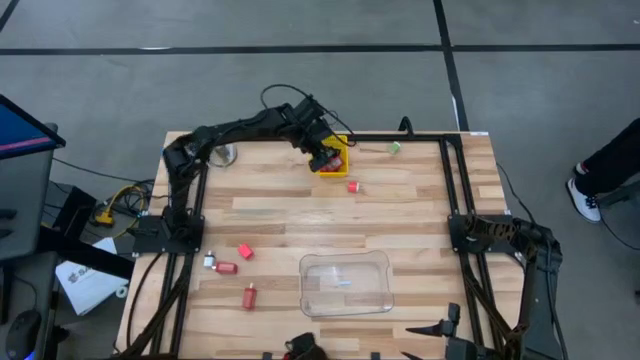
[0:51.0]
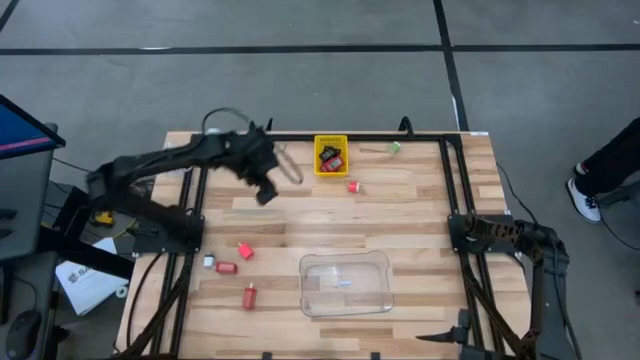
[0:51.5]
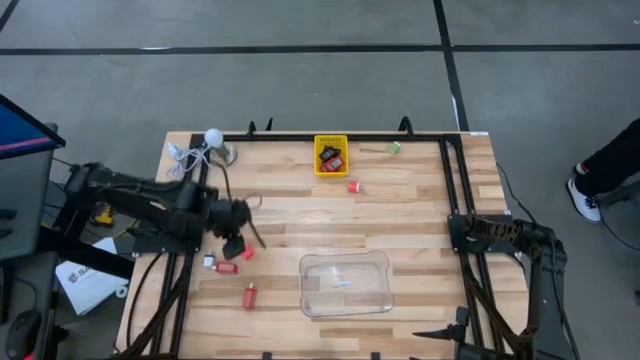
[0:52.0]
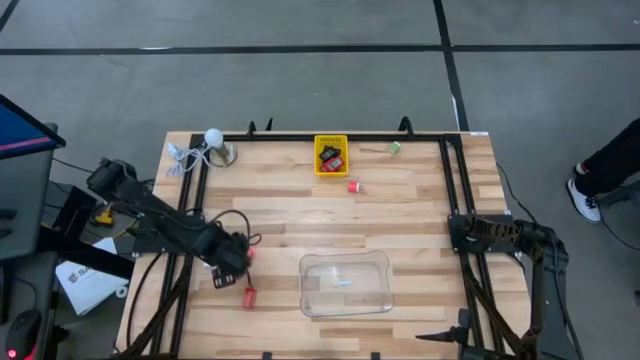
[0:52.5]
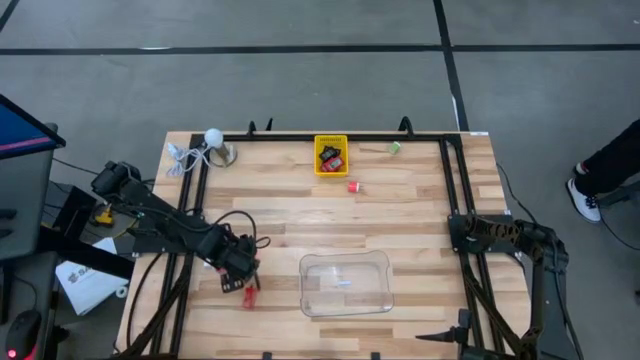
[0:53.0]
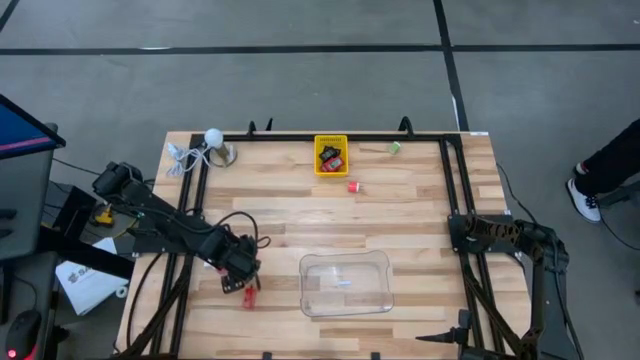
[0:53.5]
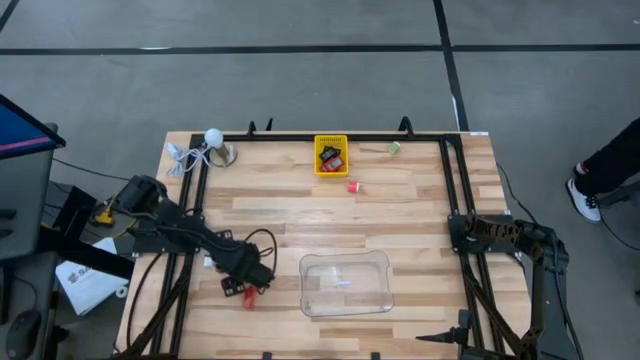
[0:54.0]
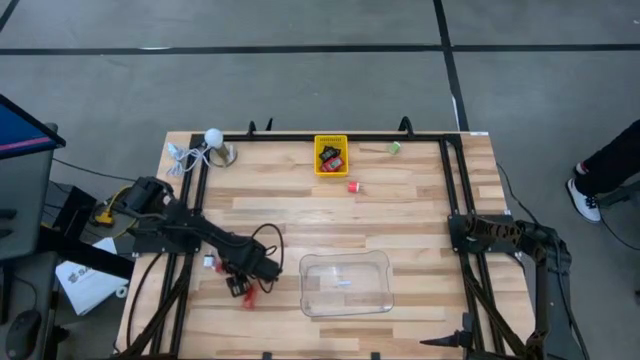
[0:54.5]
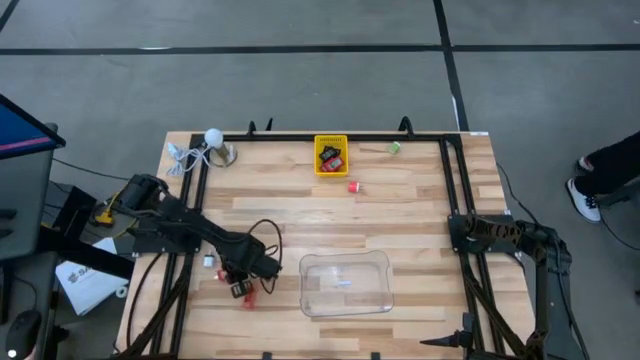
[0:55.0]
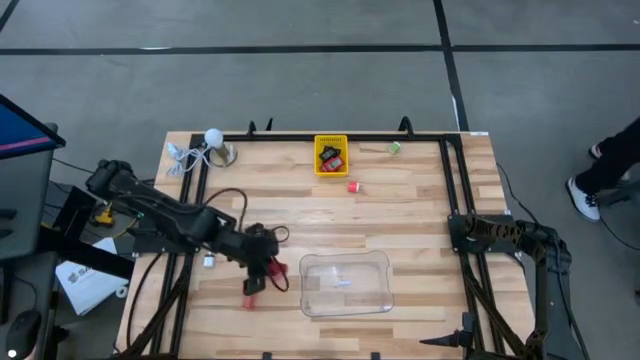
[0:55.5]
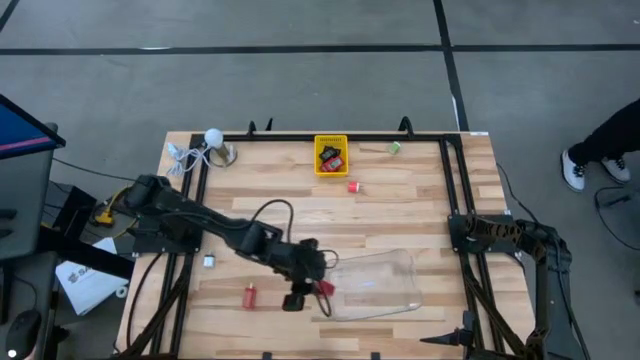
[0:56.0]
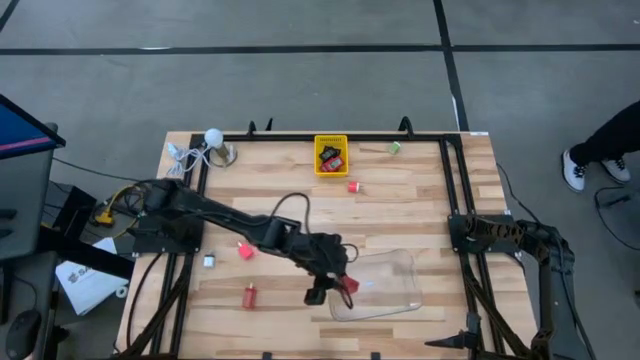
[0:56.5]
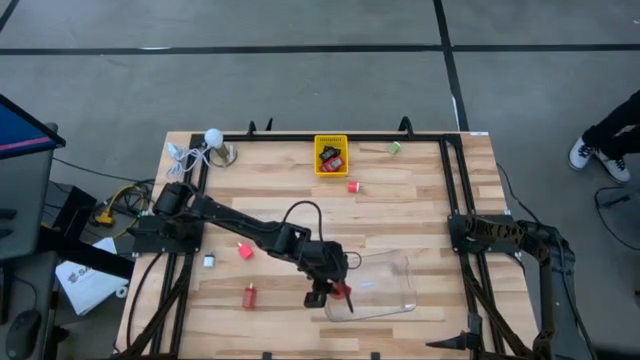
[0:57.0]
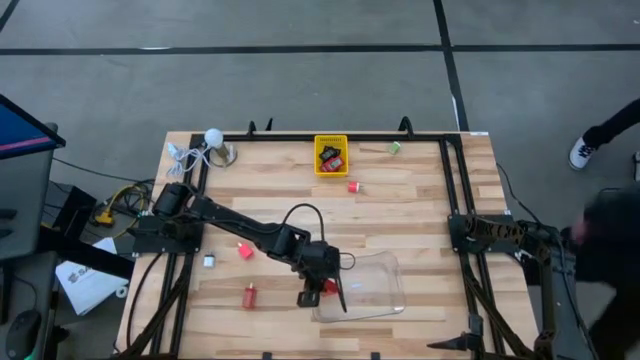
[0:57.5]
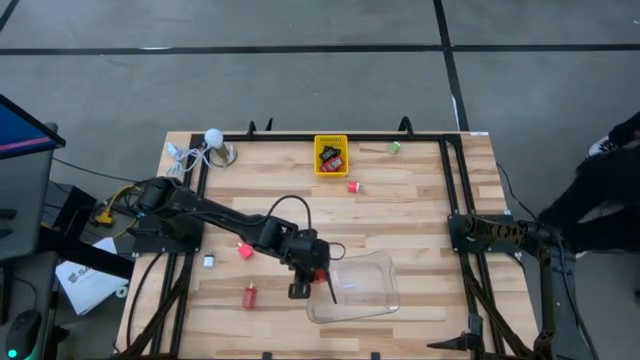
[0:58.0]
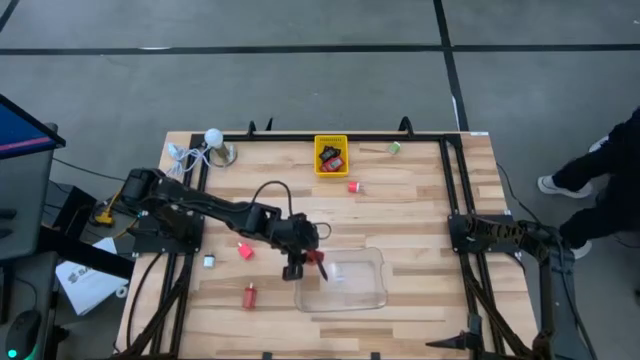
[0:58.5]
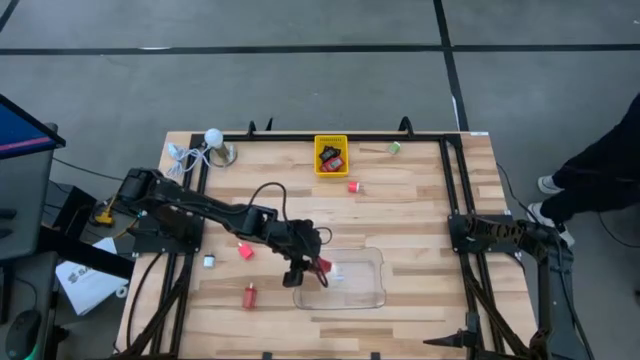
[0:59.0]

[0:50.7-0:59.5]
Task: Pick & Place Office items
Put the red charger adapter on the top into the transparent bin

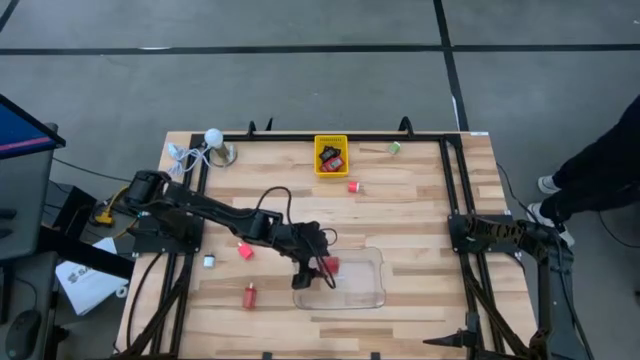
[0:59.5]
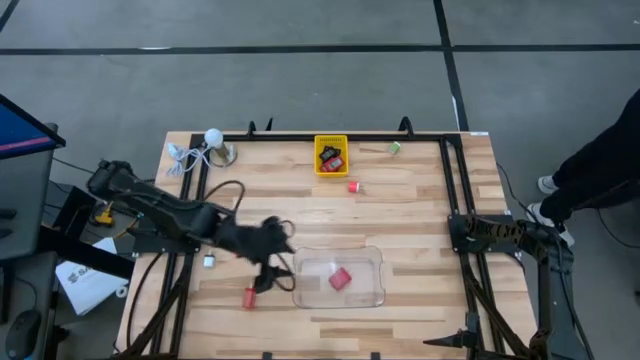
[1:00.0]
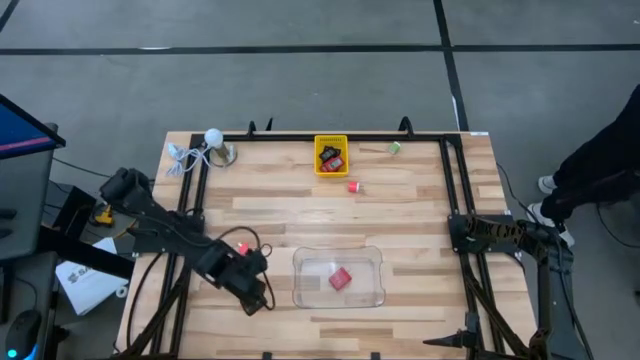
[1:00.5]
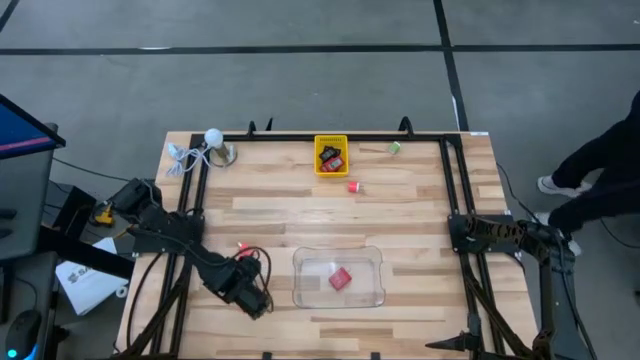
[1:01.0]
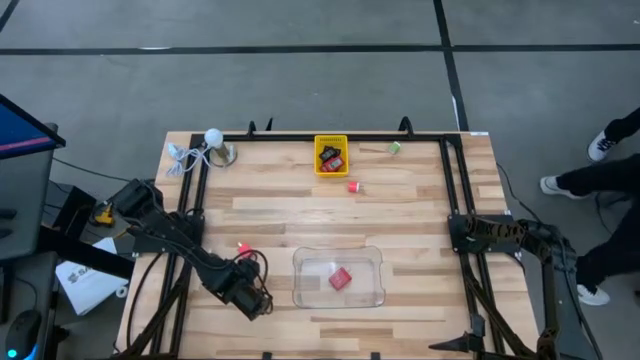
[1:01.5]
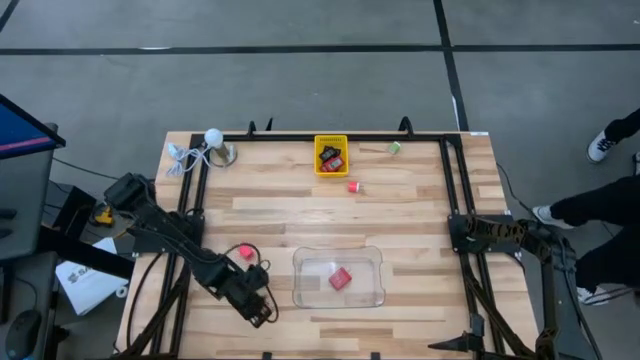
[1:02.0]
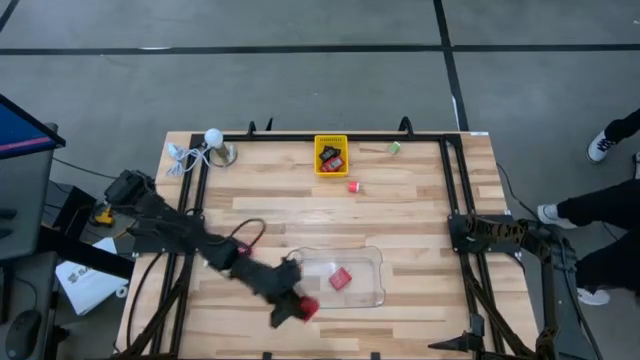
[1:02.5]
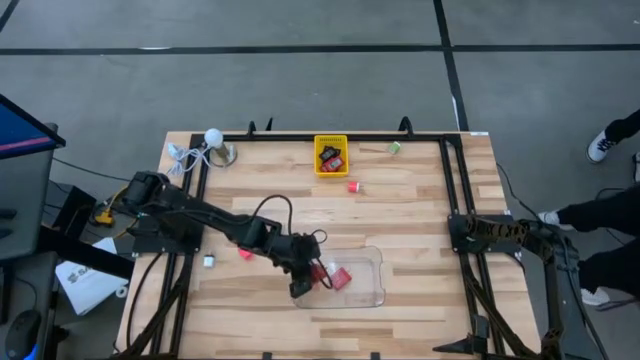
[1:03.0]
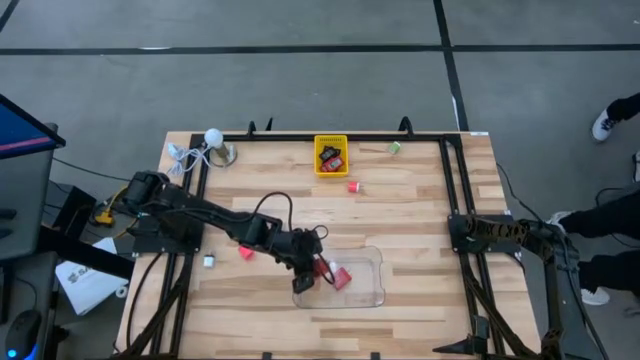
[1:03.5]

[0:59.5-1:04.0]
Put the red charger adapter into the transparent bin

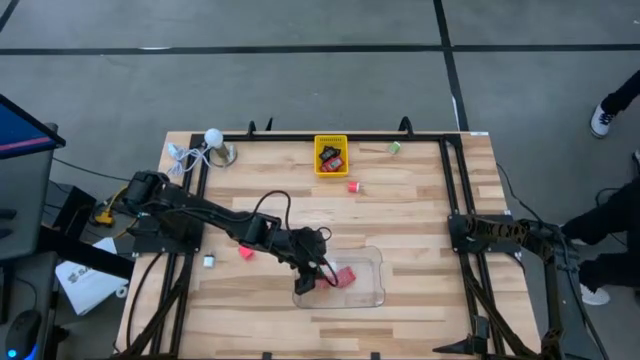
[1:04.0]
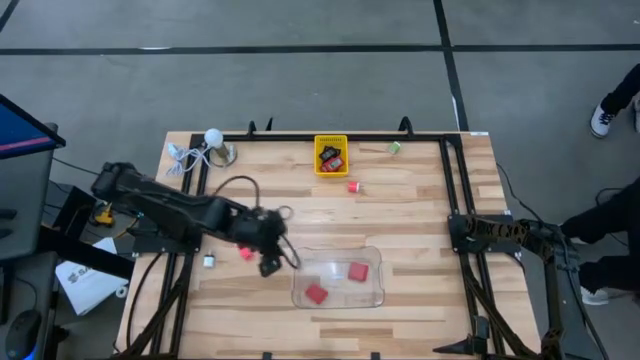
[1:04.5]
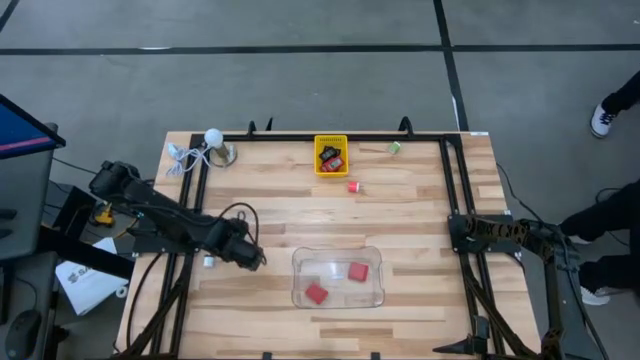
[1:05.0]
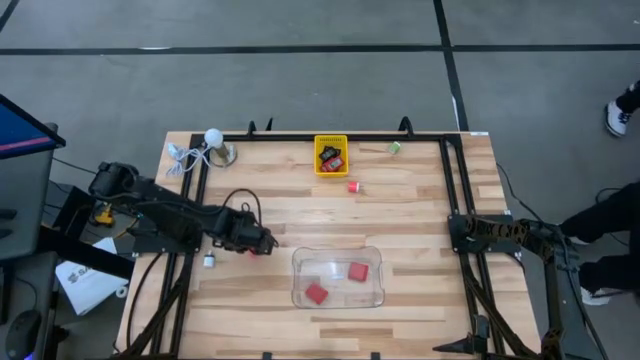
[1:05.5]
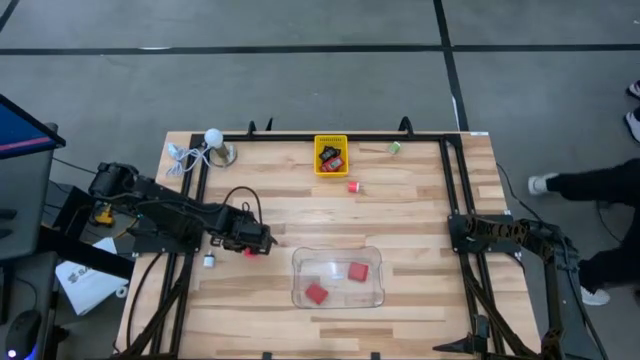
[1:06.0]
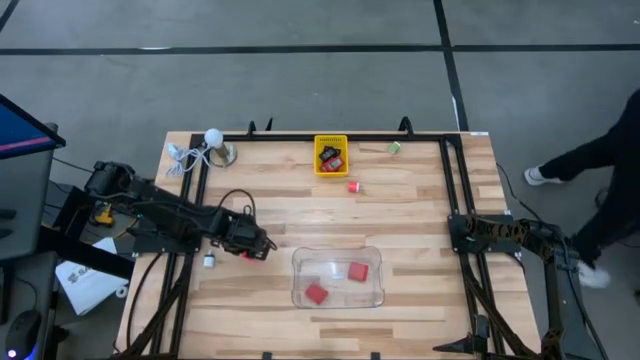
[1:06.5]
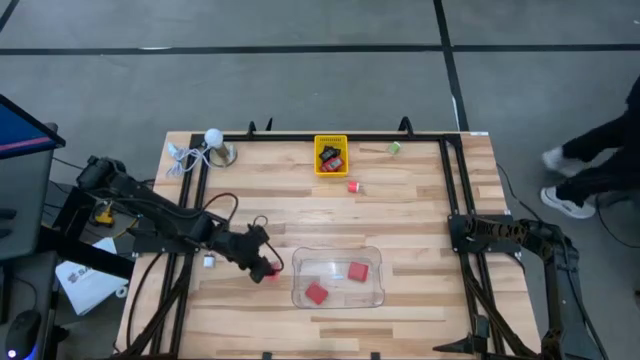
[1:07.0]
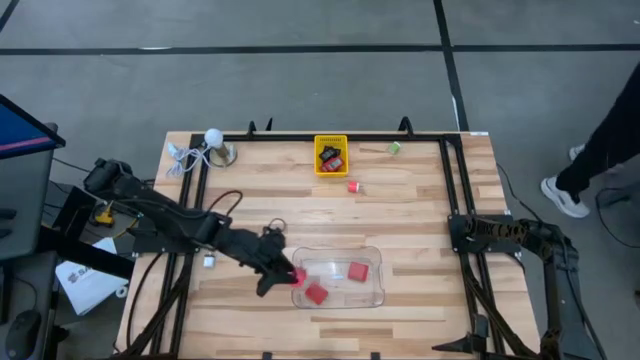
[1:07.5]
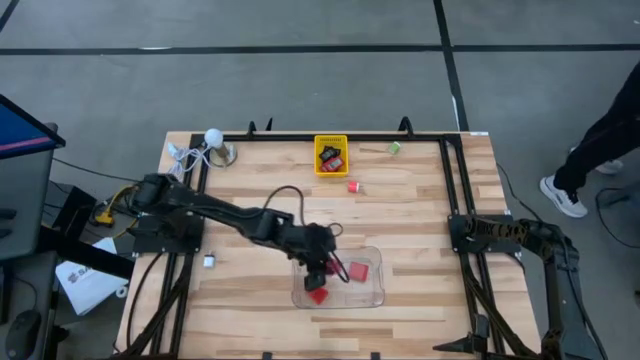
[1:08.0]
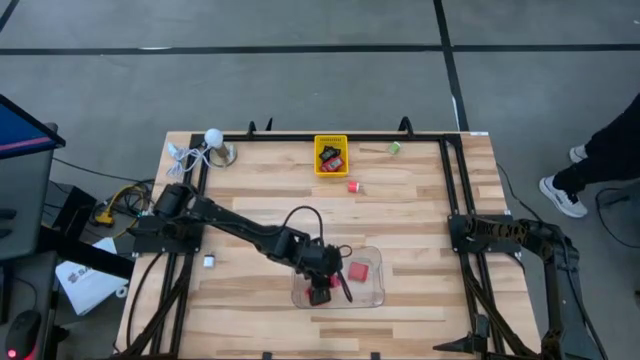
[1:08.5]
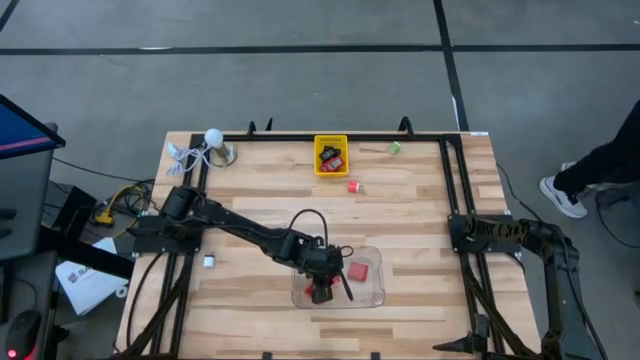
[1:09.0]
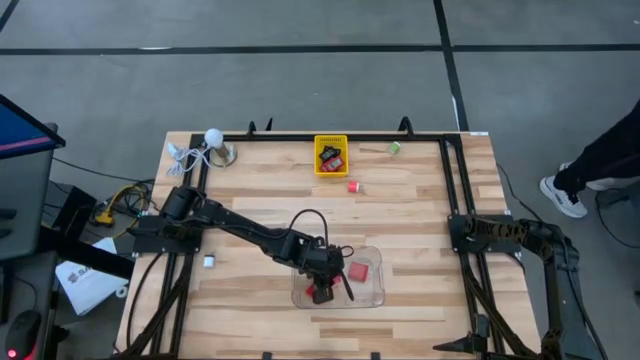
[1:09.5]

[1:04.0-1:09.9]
Put the pink charger adapter on the bottom into the transparent bin
